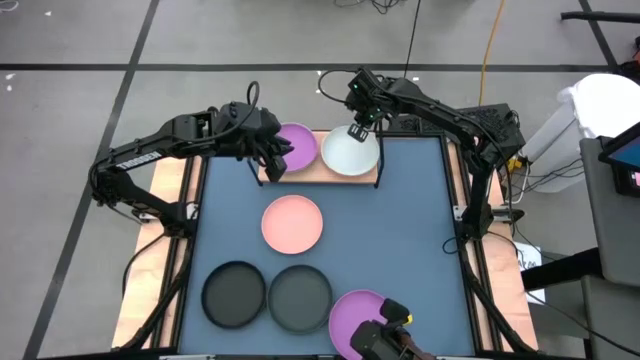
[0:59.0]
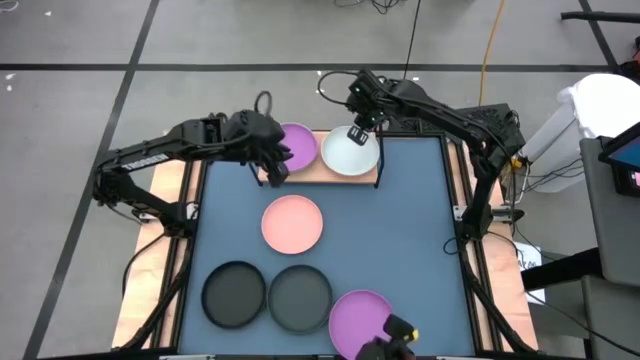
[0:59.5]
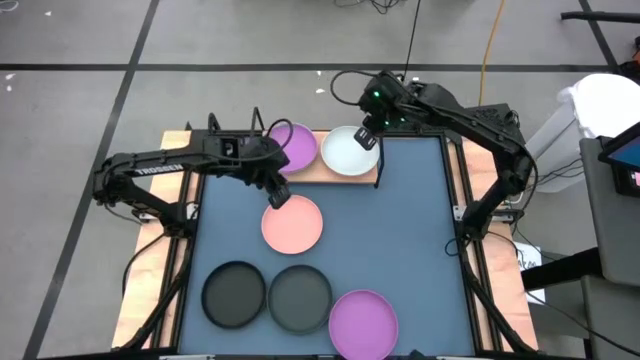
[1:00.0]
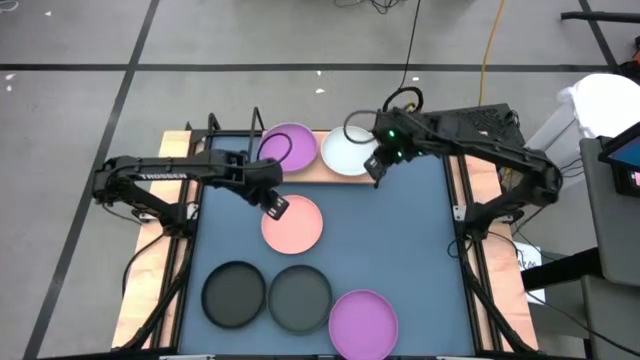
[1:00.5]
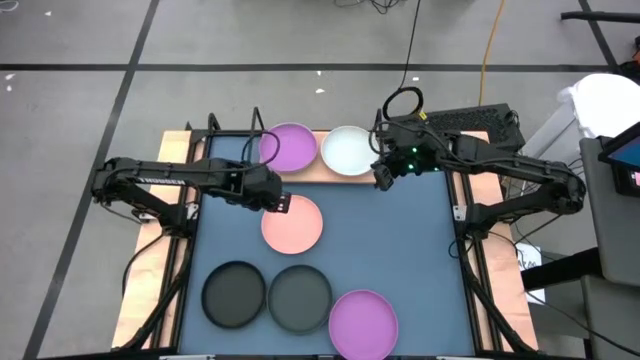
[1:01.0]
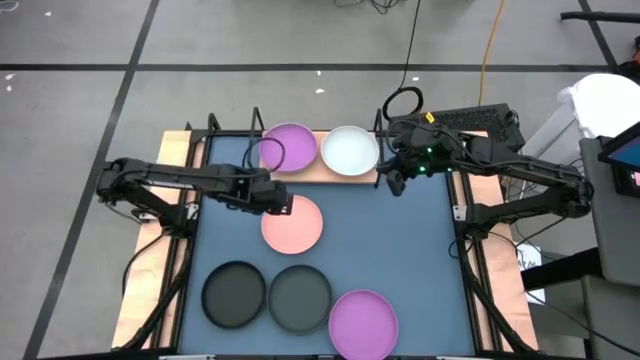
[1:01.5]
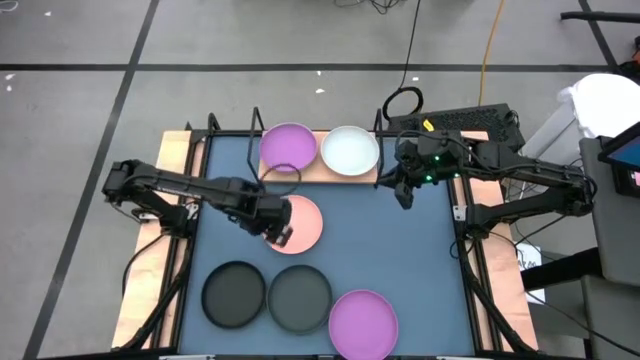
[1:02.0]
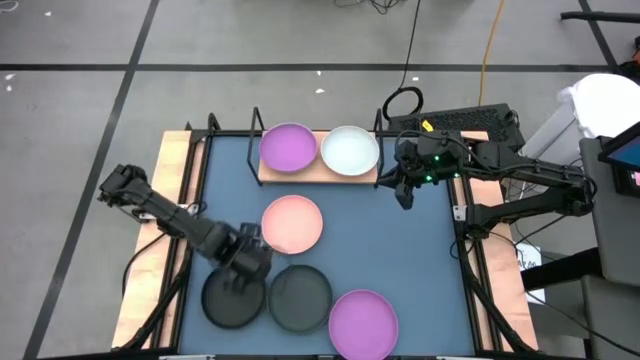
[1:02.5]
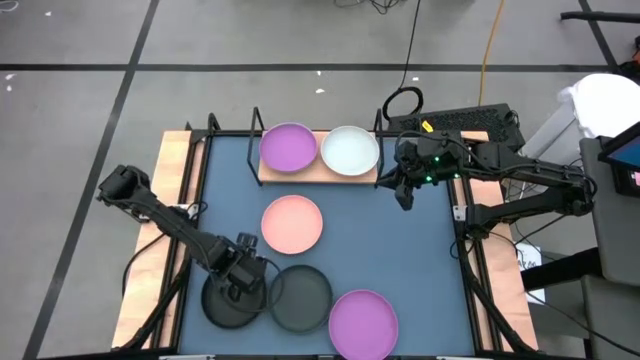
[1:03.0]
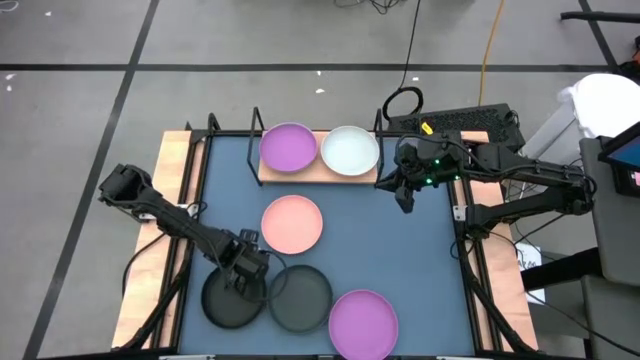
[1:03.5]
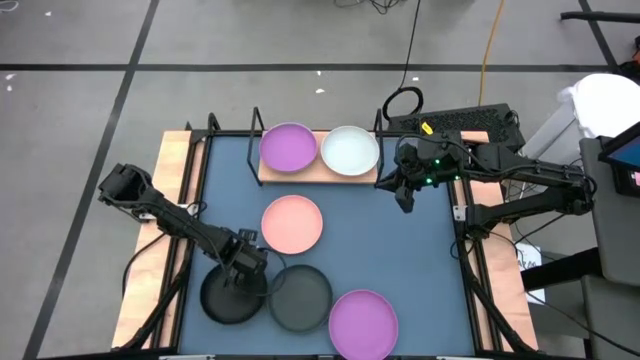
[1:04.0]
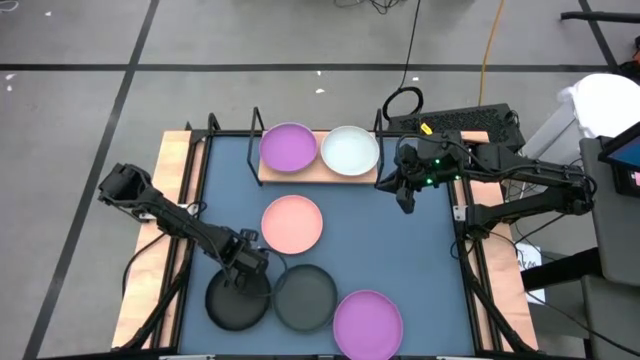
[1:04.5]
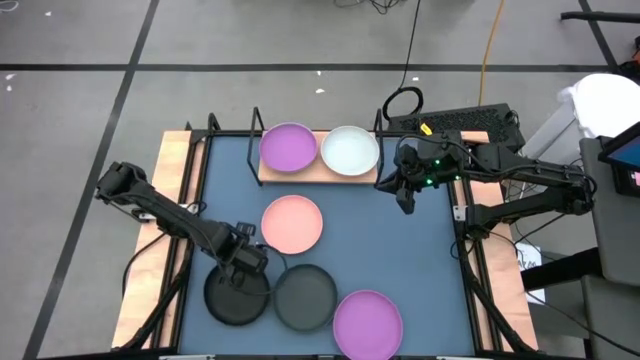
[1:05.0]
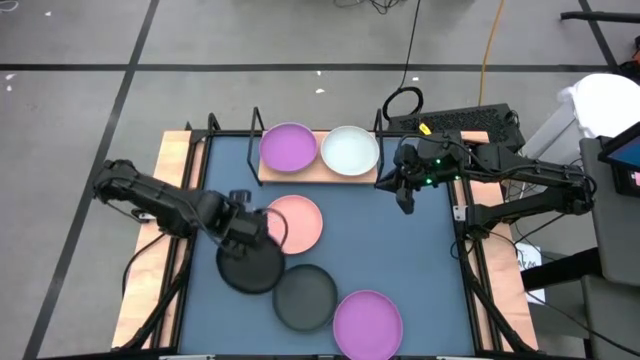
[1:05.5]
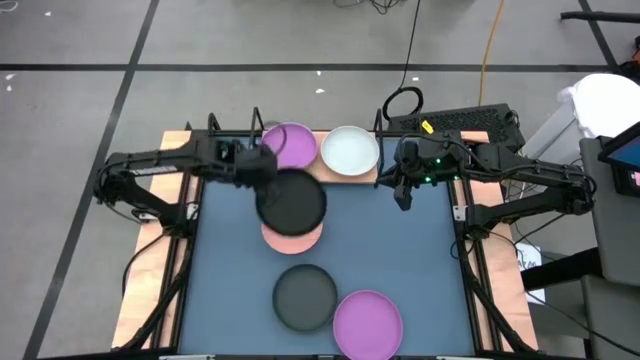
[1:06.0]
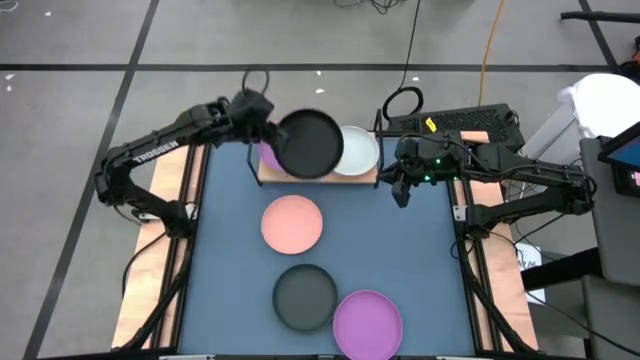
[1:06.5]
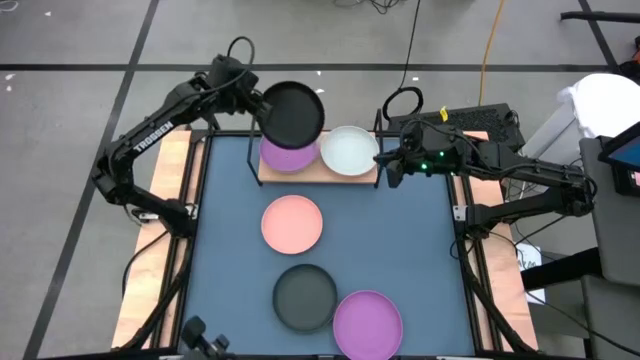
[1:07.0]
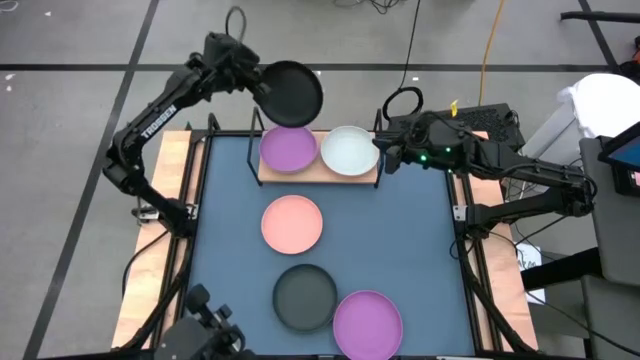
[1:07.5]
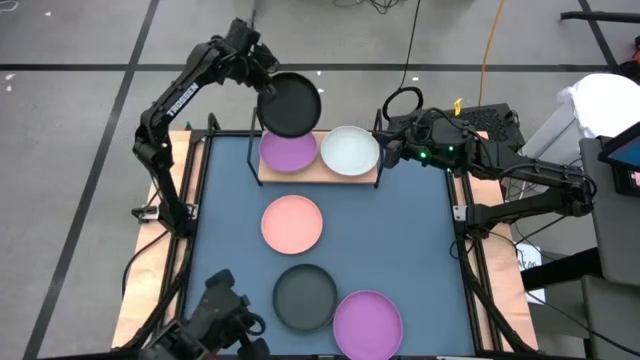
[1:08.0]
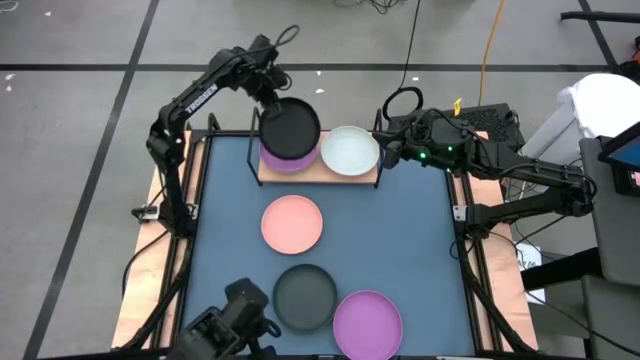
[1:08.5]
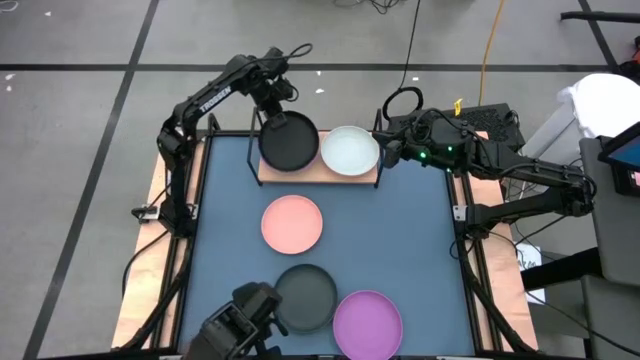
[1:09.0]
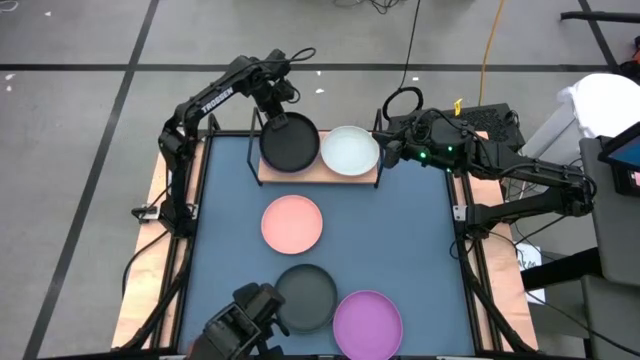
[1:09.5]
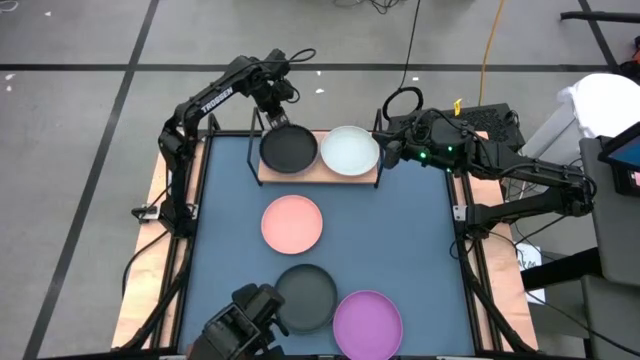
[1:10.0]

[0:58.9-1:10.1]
Task: Place and stack plates onto a shelf
Stack the left black plate on top of the purple plate

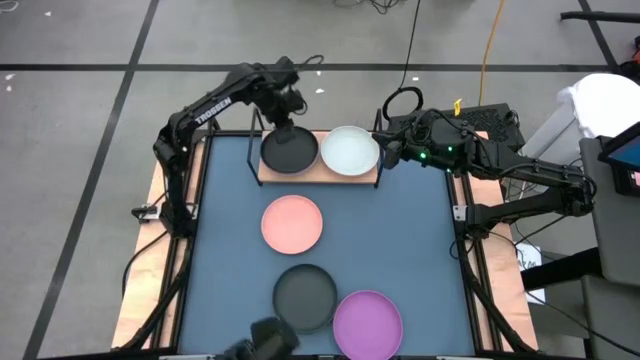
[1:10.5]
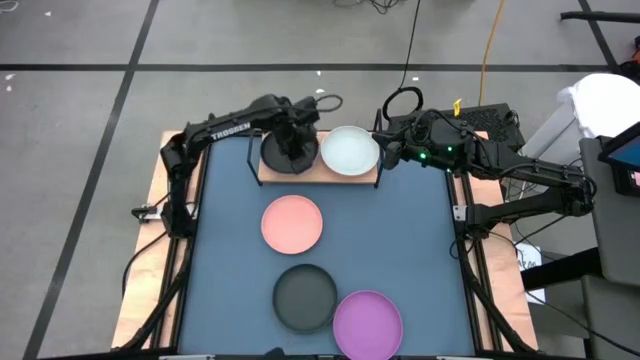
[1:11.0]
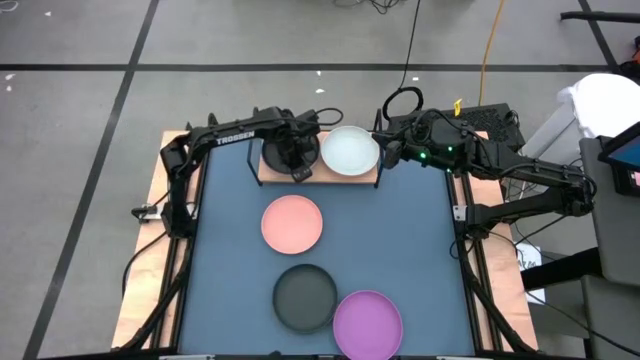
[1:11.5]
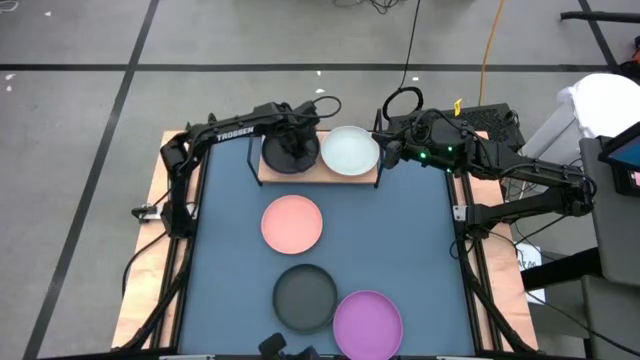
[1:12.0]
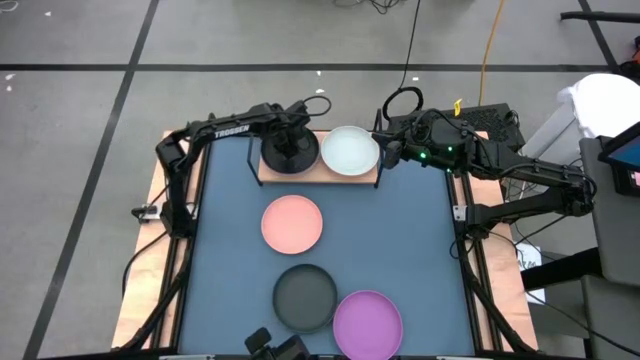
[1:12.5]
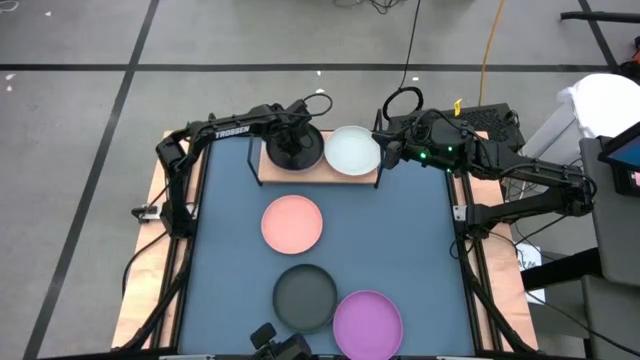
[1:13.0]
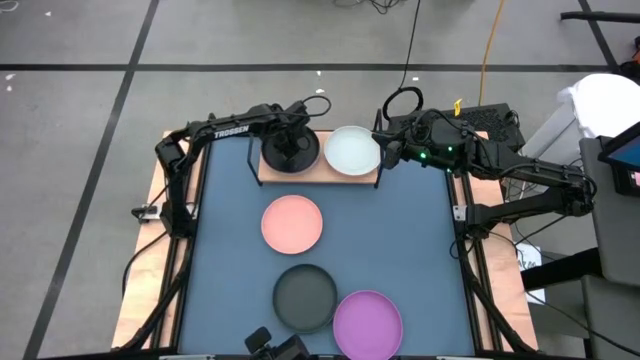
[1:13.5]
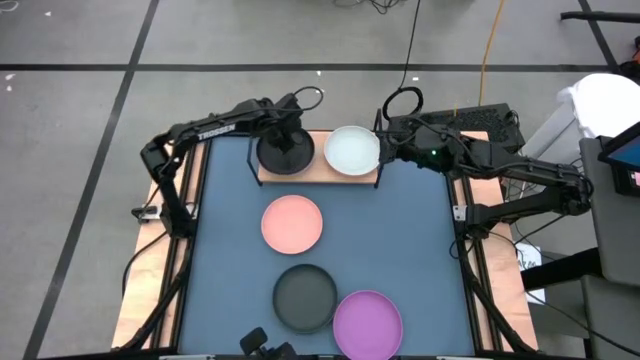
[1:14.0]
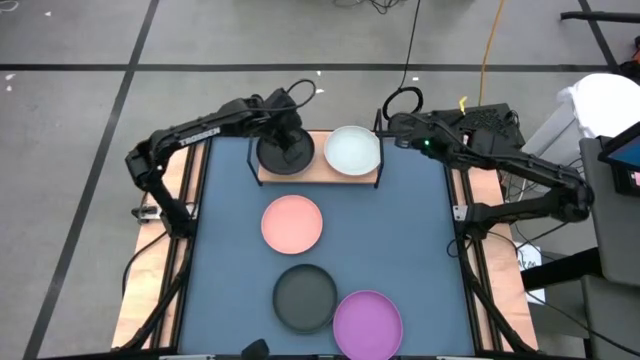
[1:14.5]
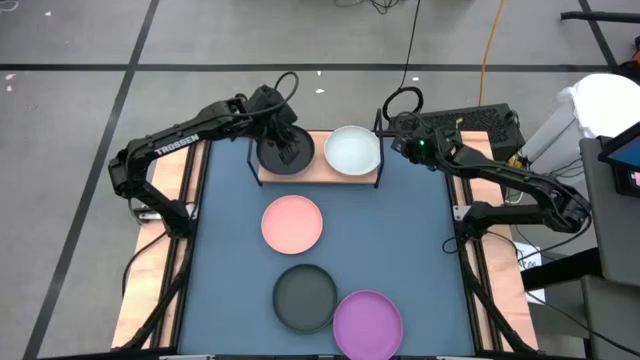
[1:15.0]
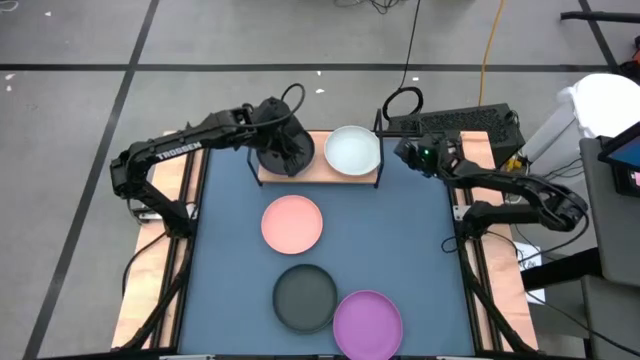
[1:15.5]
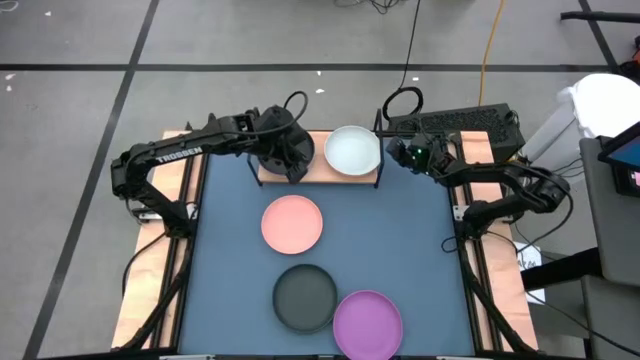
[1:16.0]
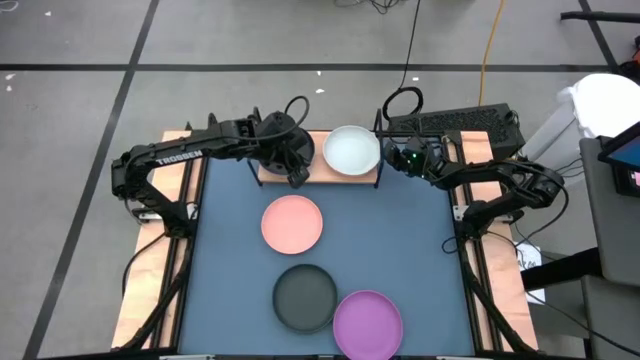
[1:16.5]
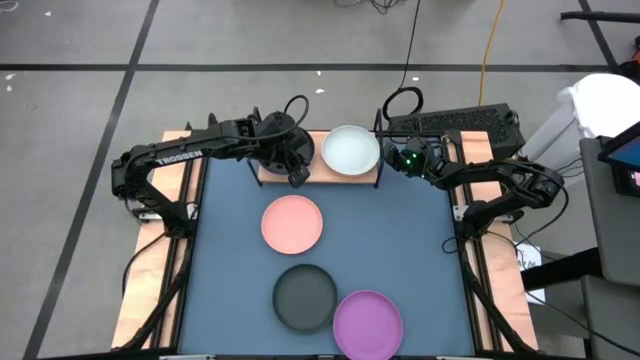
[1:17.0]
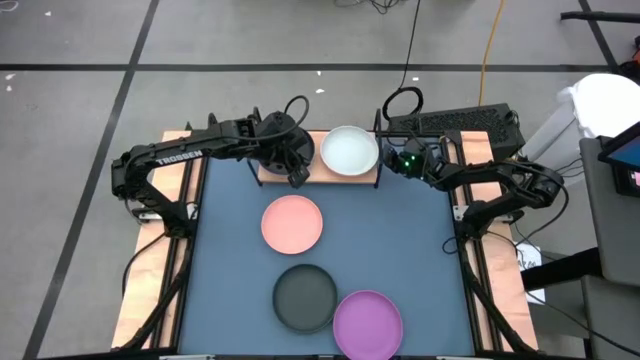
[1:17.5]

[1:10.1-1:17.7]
Adjust the white plate on the shelf

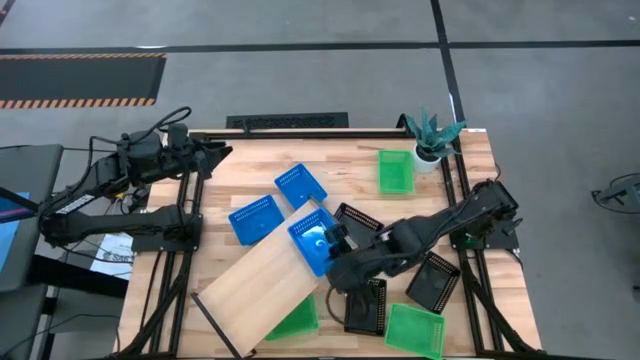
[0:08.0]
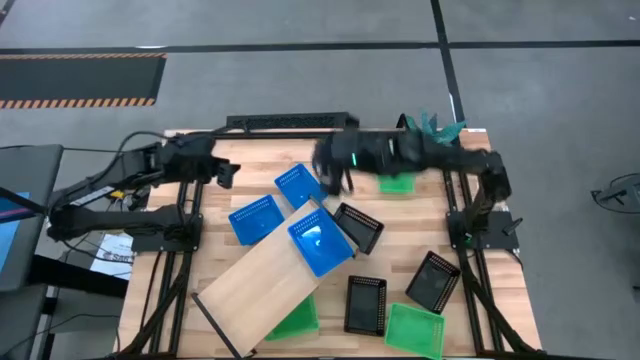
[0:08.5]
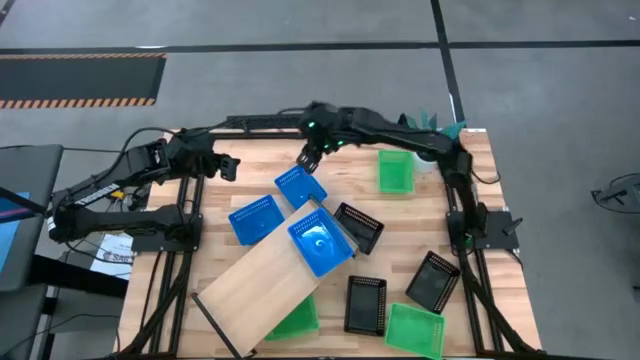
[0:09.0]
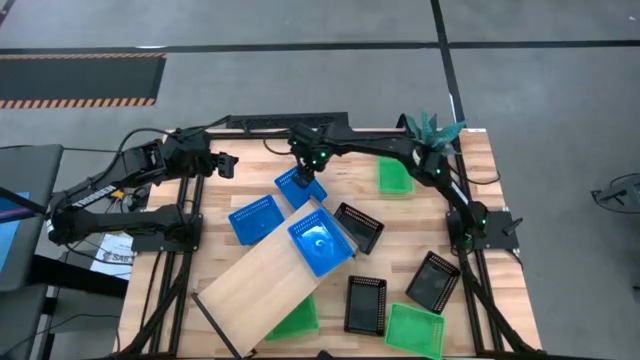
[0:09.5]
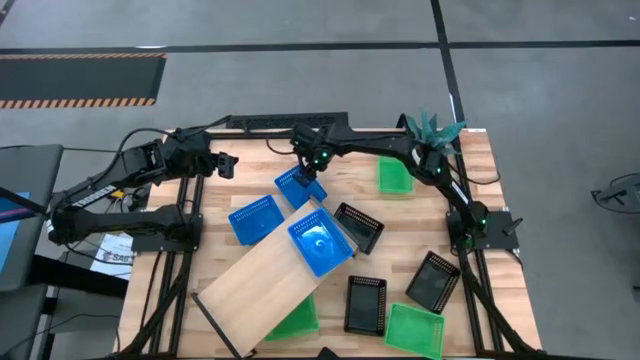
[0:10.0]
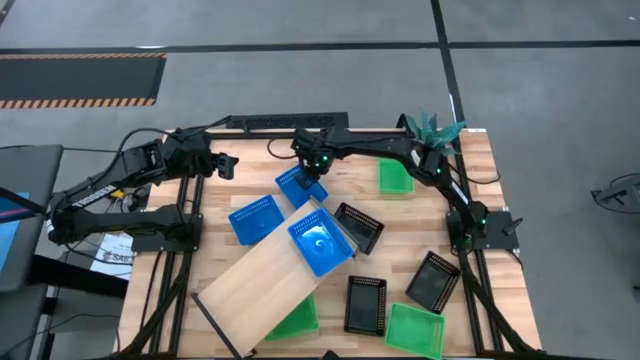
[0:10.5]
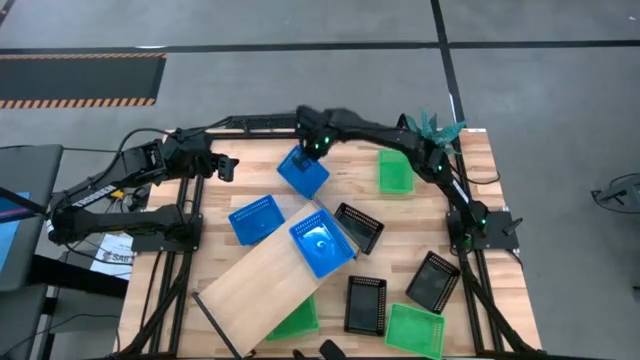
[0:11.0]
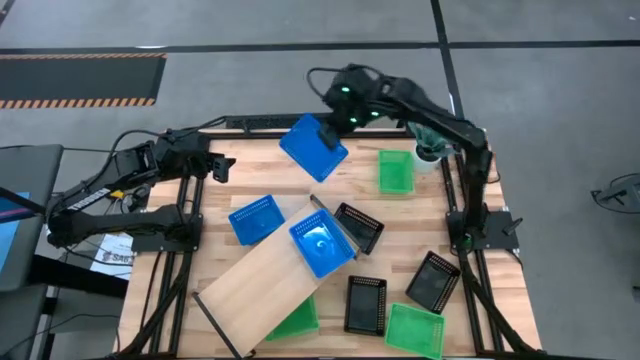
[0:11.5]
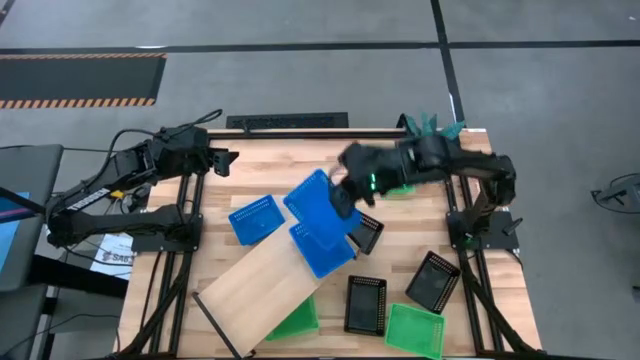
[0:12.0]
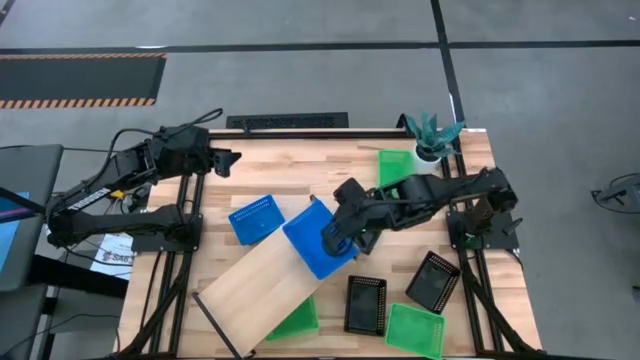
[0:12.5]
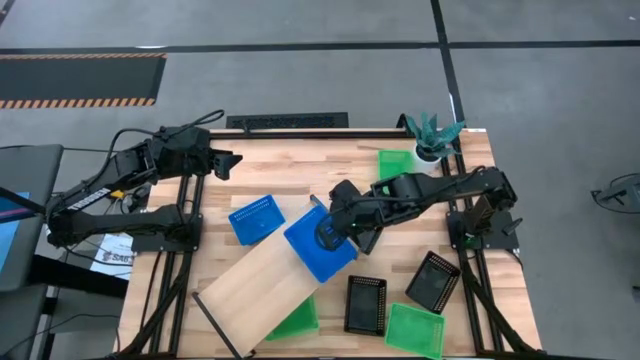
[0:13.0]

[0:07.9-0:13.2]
Task: Stack baskets on shelf by color
Stack the top blue bin on the blue bin on the shelf
